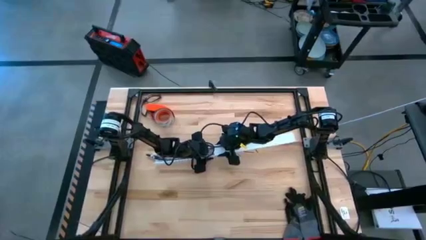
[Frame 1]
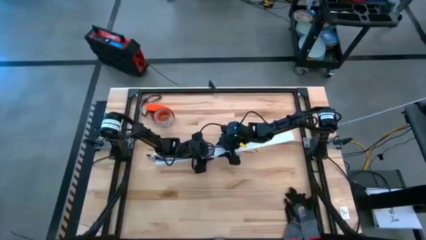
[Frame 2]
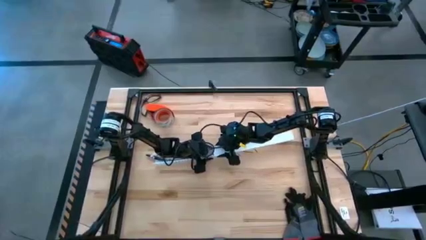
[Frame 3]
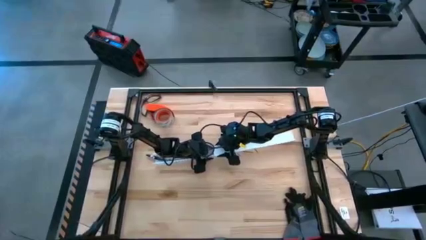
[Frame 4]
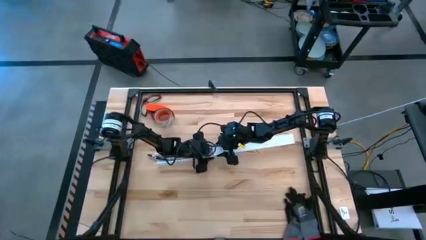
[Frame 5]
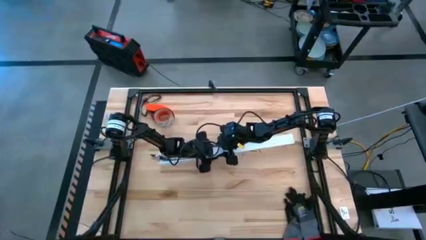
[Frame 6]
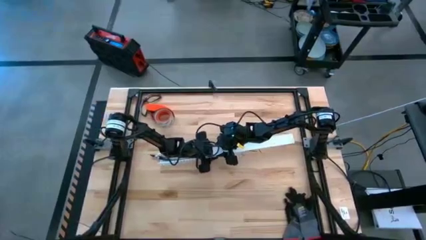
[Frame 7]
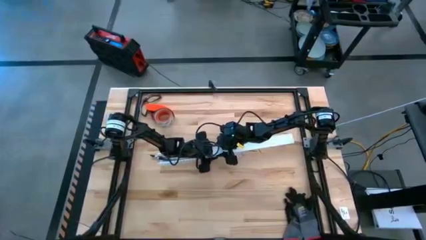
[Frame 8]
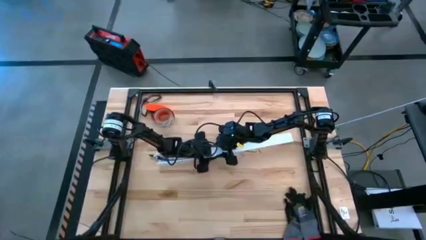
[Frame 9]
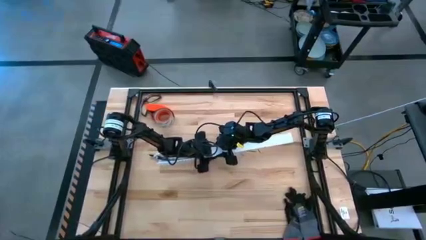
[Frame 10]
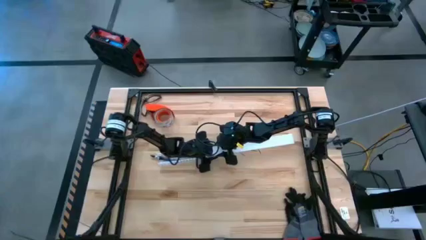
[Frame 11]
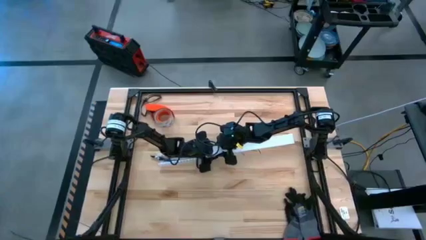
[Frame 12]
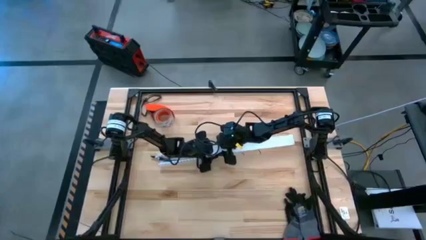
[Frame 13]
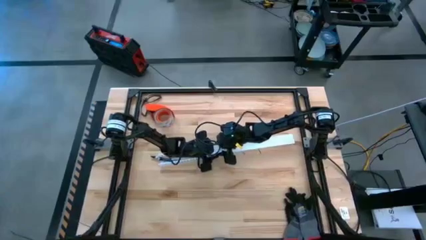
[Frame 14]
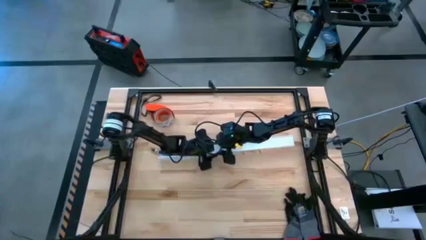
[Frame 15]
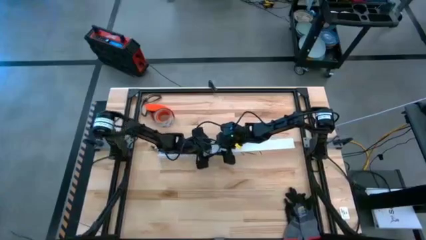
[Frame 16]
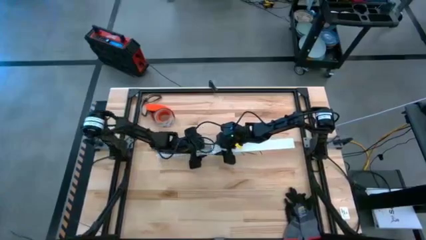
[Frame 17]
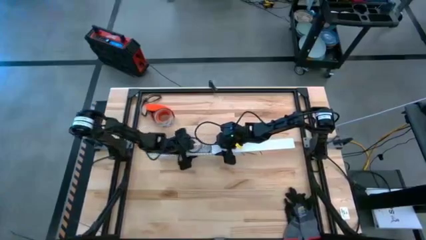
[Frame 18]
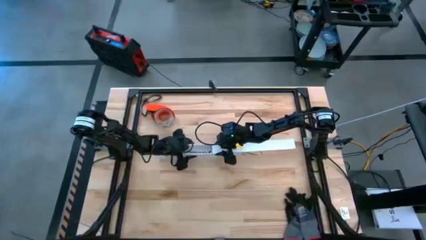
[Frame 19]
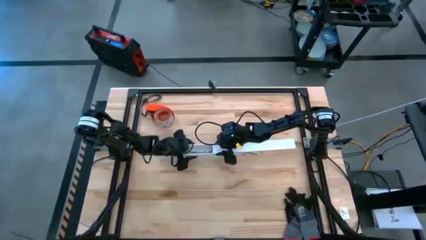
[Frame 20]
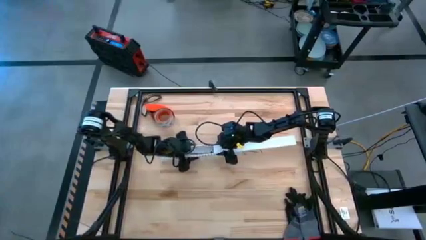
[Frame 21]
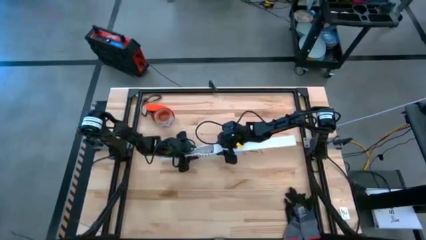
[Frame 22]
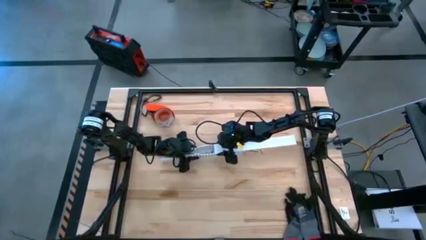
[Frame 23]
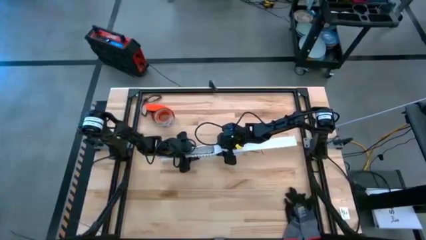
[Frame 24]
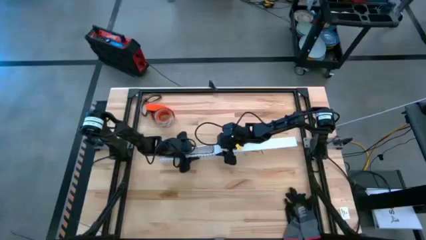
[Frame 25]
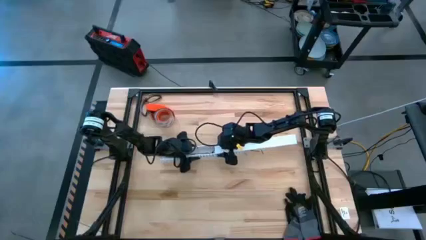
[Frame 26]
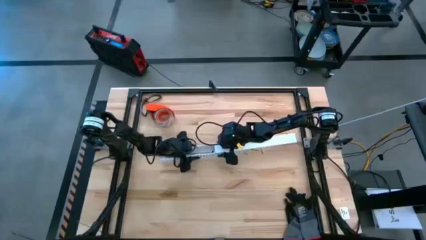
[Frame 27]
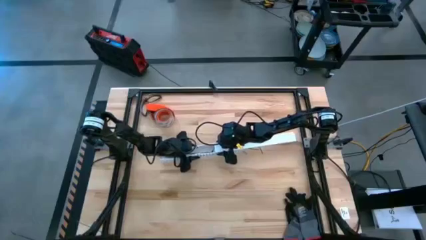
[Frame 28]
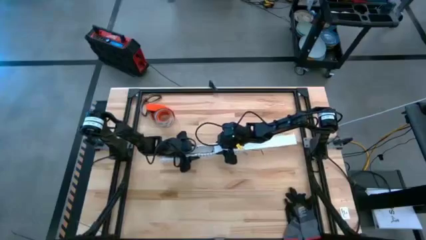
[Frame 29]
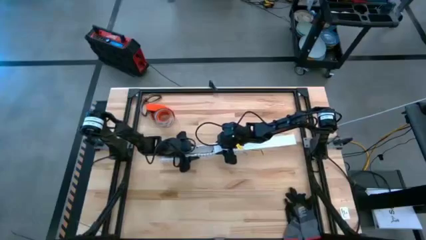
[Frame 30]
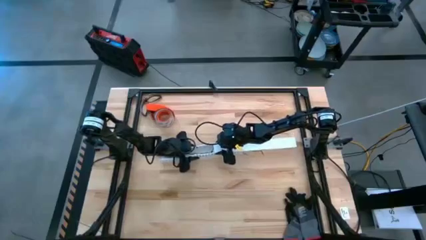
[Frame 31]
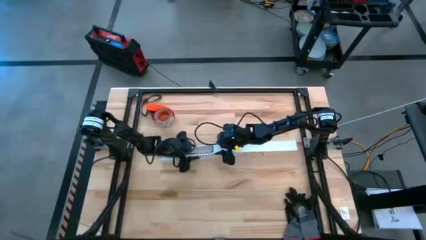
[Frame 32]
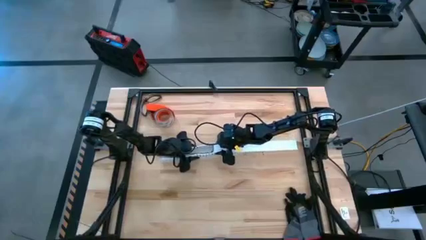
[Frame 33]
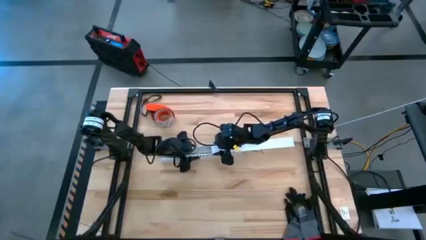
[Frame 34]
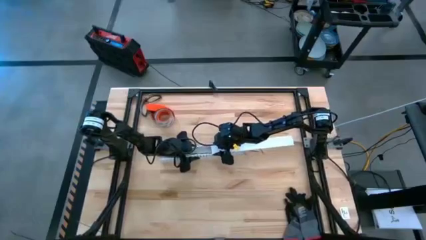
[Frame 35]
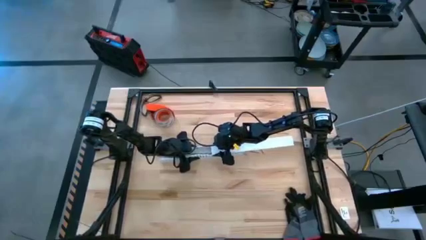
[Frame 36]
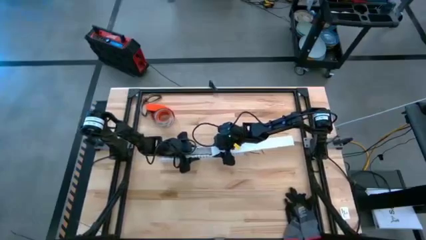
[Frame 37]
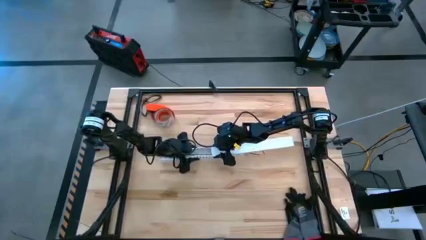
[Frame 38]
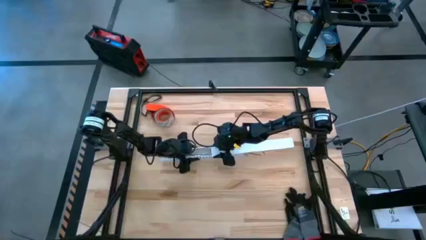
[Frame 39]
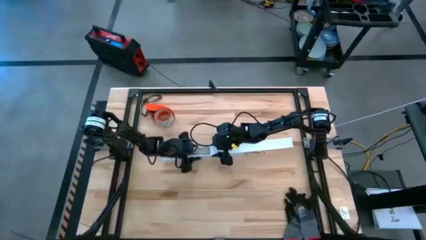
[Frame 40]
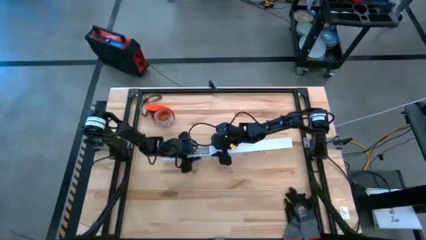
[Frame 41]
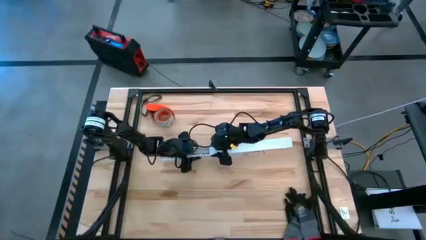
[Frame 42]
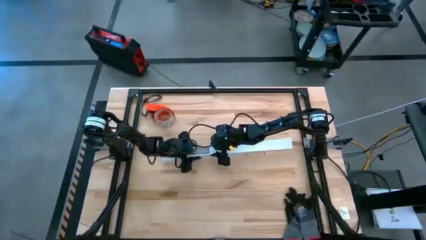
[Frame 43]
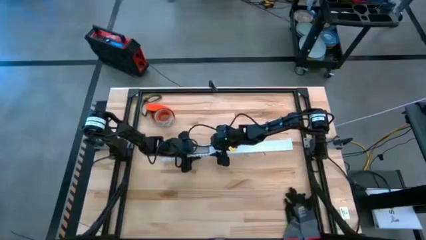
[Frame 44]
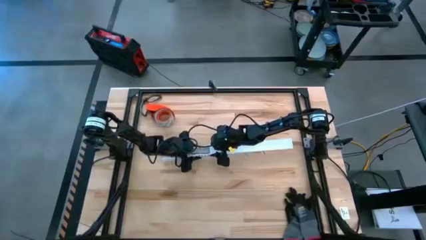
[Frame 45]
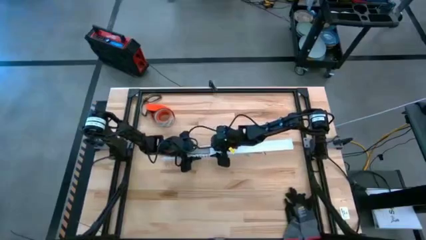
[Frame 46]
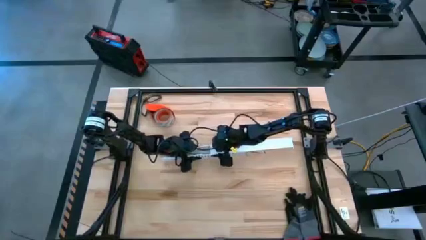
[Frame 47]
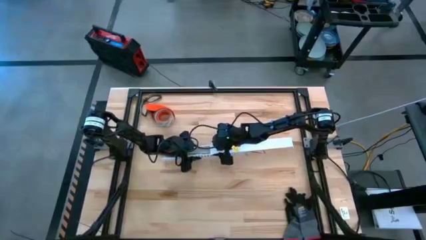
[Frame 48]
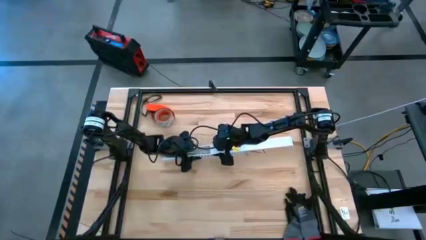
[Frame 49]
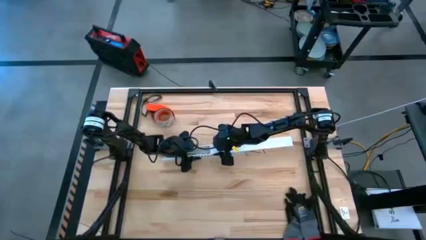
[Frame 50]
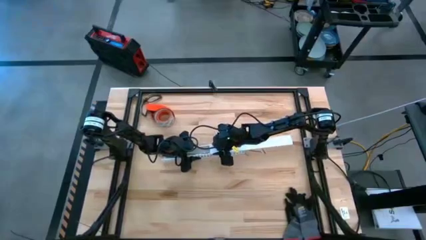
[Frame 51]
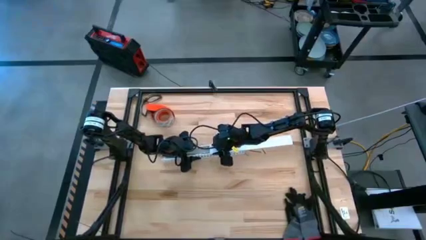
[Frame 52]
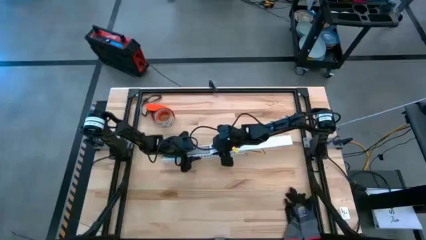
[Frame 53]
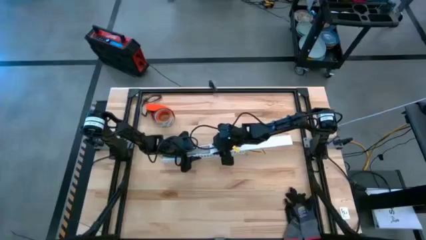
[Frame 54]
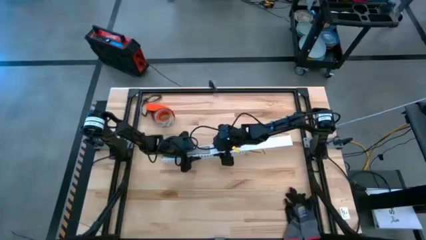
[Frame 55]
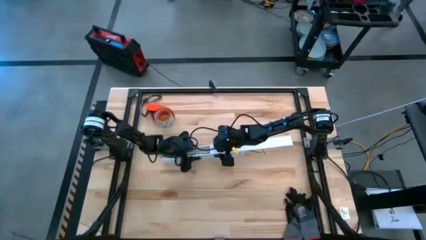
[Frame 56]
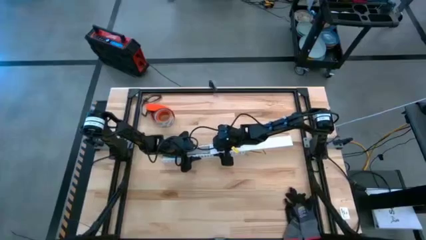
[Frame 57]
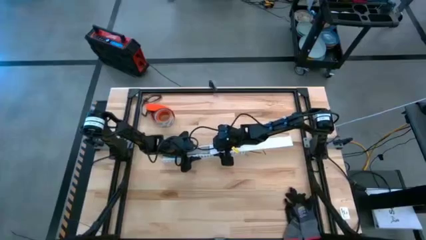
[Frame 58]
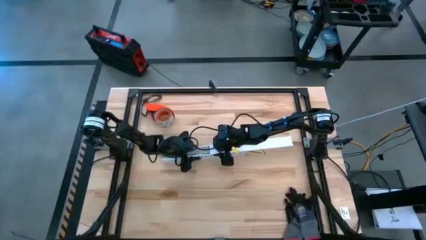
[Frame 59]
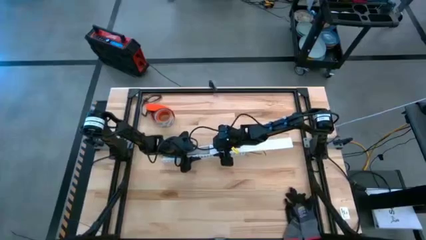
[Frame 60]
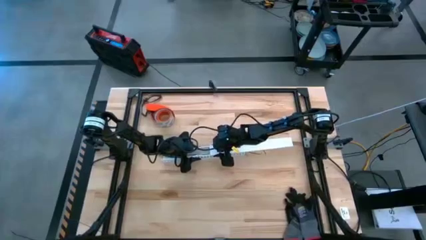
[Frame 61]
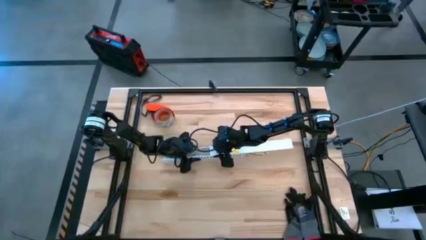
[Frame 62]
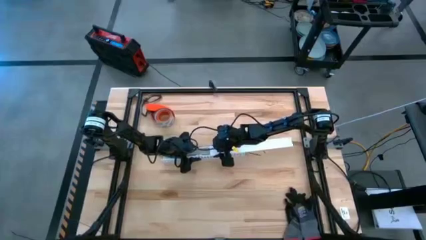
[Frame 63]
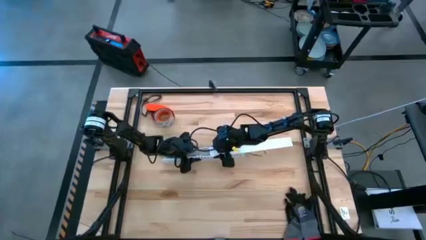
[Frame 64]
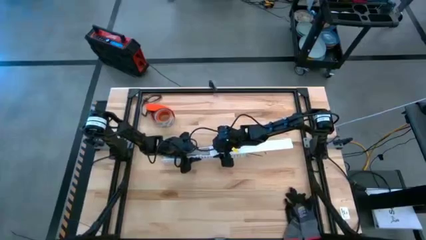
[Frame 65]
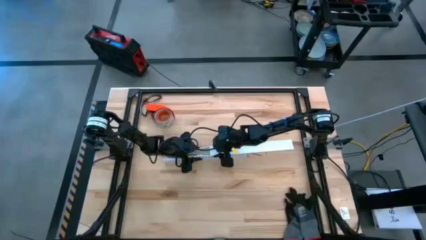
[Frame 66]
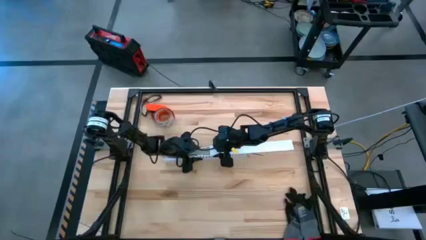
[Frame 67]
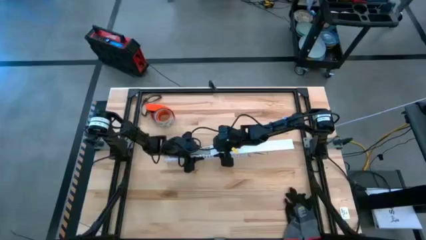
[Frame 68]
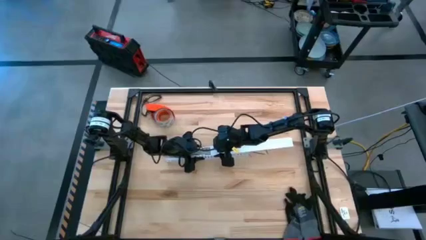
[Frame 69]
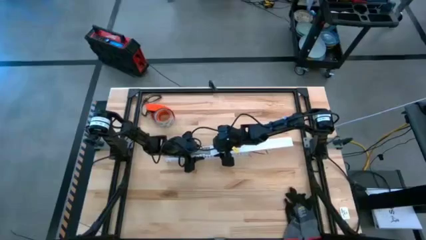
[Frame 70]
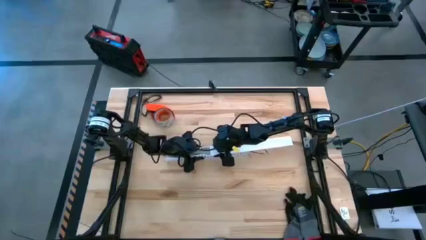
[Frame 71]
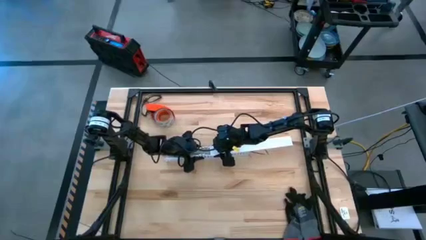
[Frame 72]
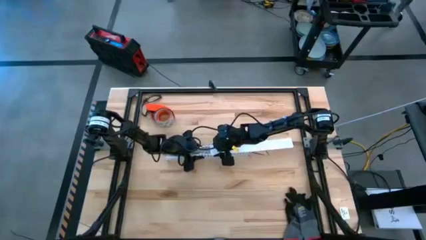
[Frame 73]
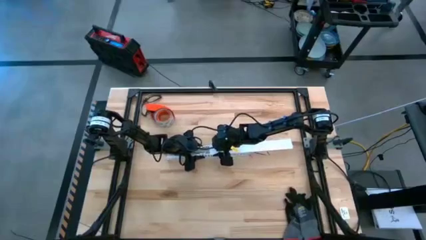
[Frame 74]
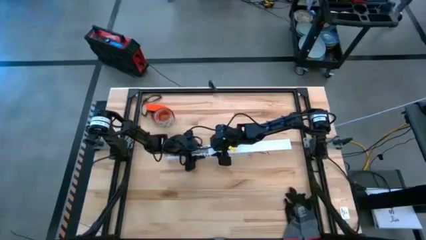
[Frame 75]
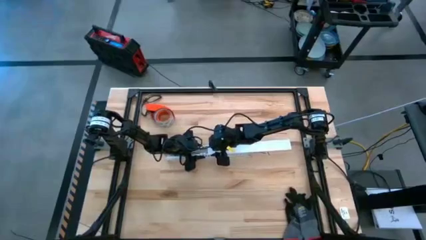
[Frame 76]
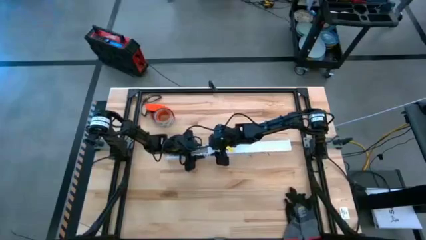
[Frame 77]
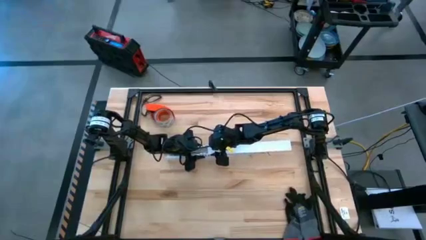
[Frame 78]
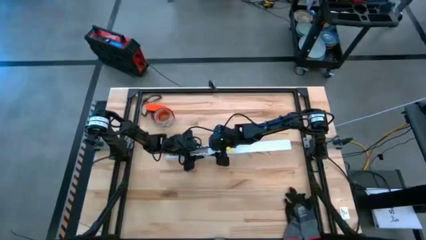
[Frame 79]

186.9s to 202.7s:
Task: Ziptie cables
Close the white cable duct
